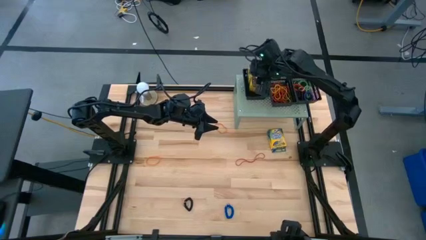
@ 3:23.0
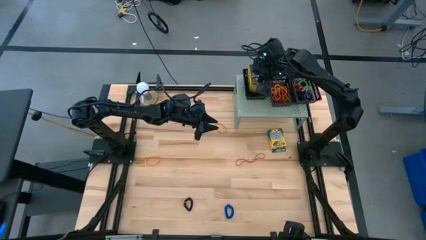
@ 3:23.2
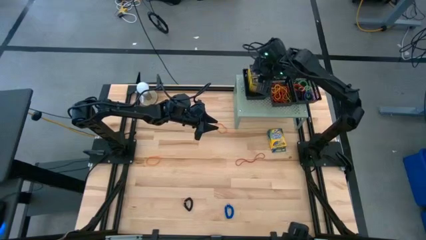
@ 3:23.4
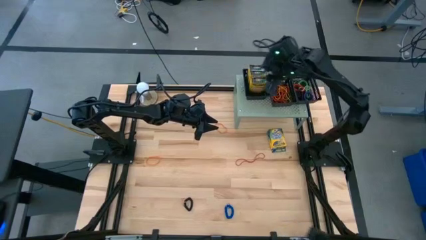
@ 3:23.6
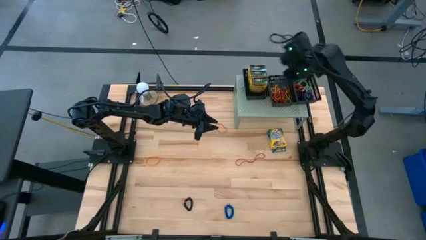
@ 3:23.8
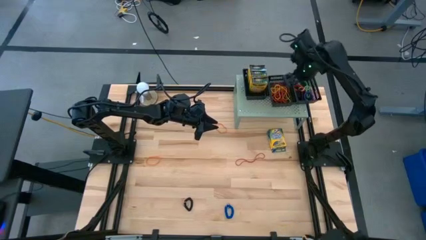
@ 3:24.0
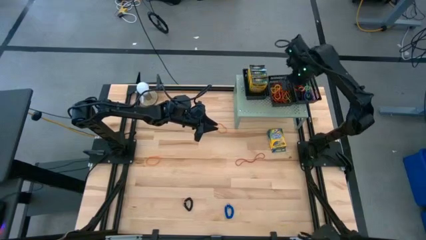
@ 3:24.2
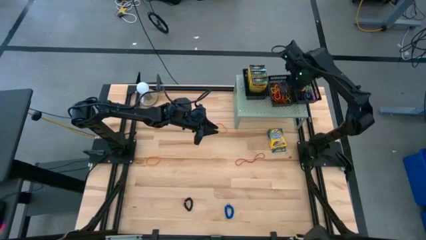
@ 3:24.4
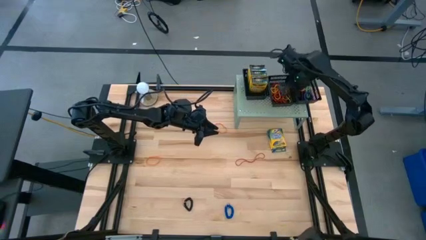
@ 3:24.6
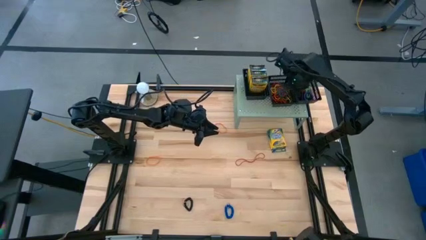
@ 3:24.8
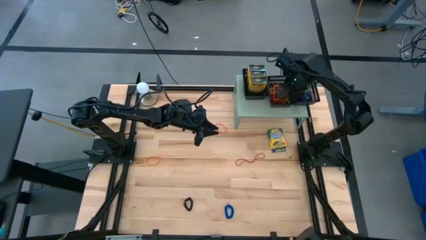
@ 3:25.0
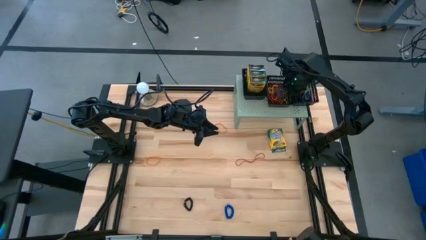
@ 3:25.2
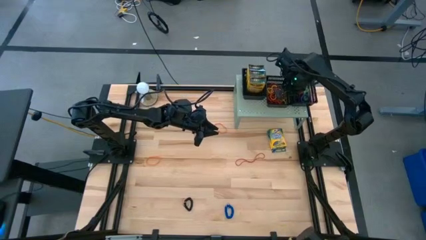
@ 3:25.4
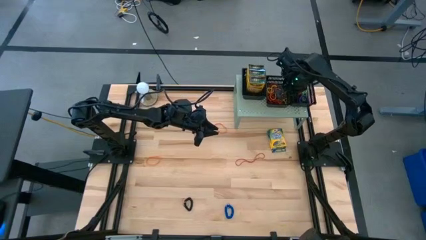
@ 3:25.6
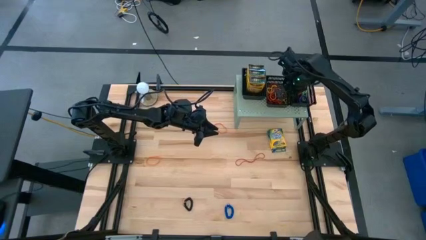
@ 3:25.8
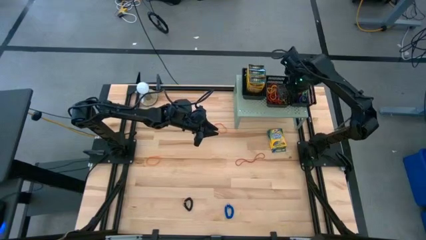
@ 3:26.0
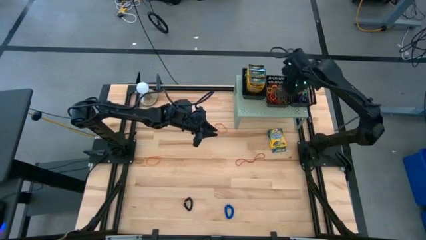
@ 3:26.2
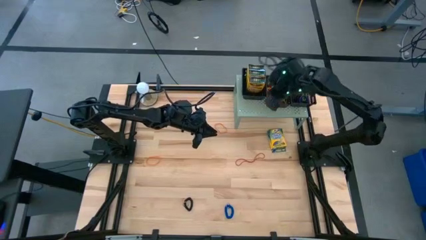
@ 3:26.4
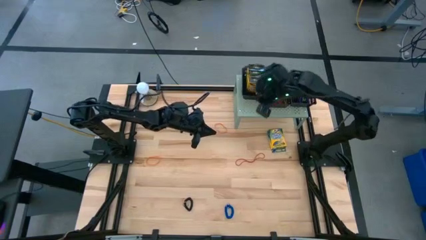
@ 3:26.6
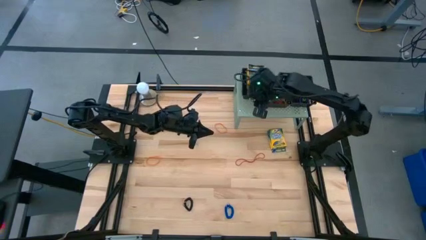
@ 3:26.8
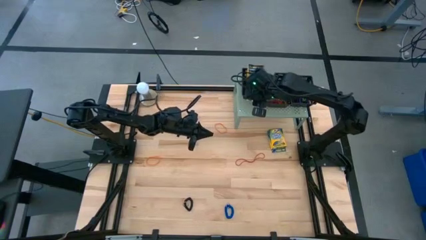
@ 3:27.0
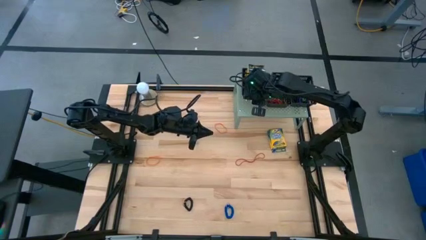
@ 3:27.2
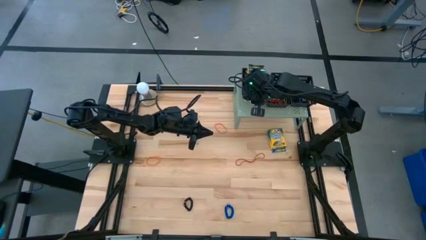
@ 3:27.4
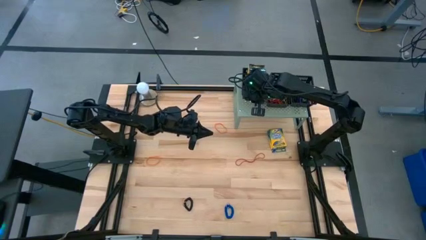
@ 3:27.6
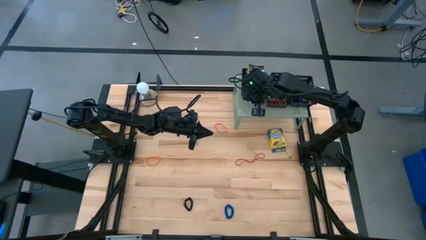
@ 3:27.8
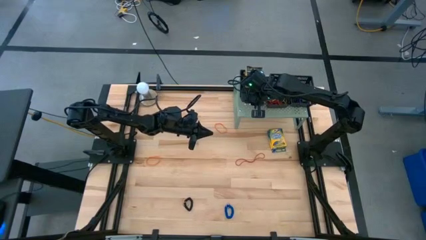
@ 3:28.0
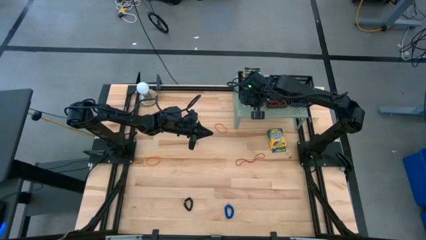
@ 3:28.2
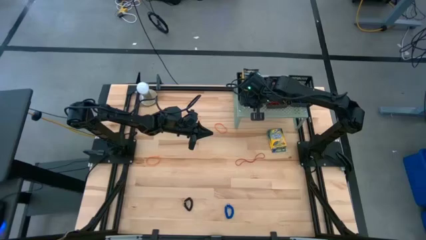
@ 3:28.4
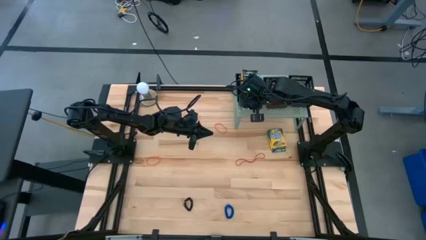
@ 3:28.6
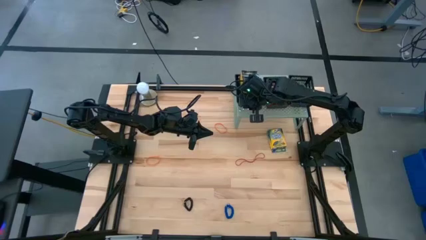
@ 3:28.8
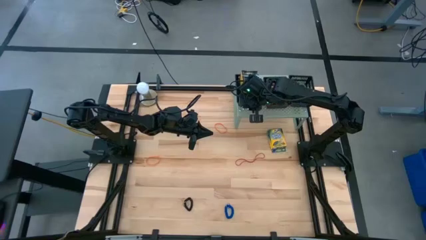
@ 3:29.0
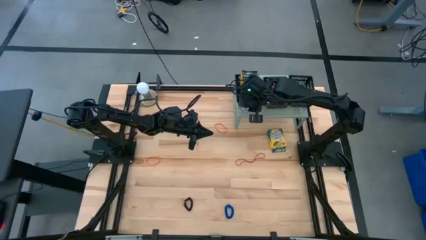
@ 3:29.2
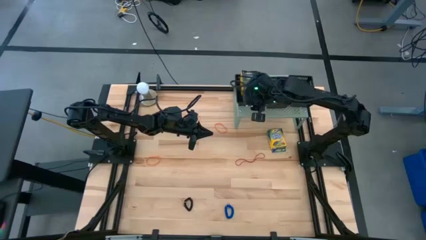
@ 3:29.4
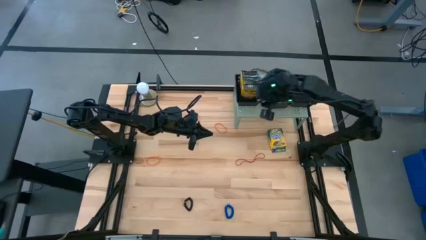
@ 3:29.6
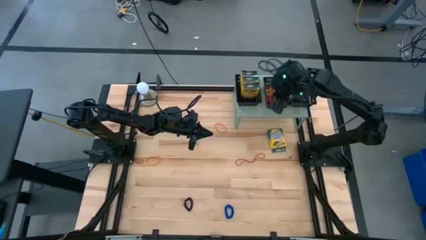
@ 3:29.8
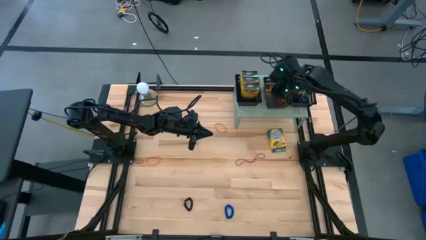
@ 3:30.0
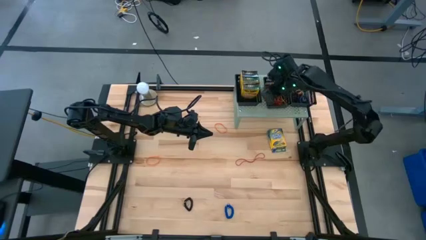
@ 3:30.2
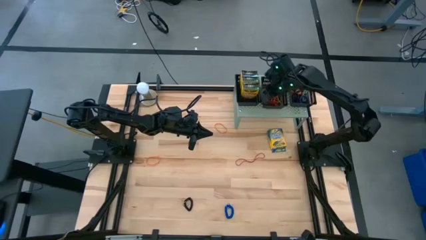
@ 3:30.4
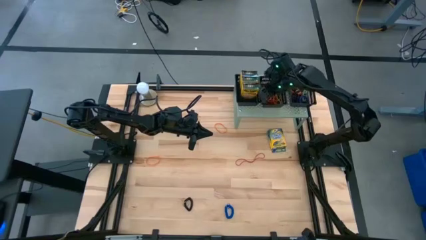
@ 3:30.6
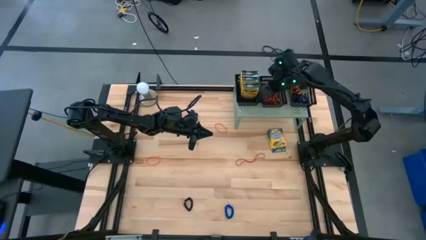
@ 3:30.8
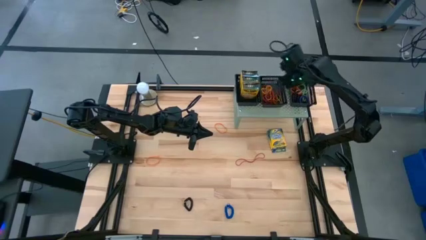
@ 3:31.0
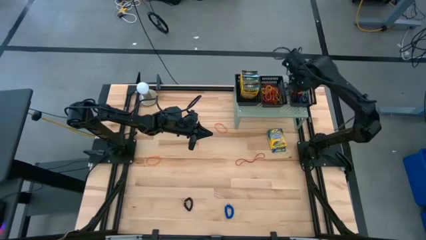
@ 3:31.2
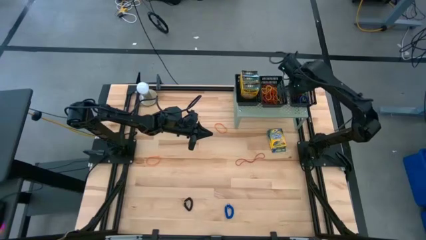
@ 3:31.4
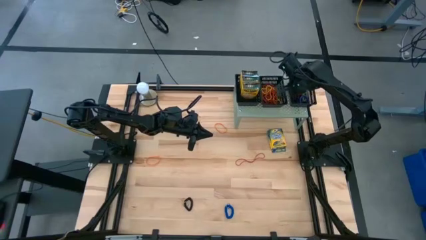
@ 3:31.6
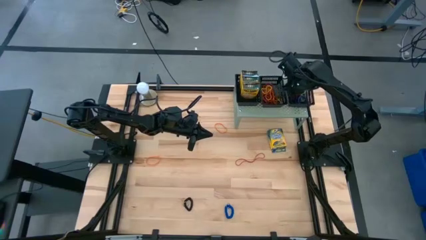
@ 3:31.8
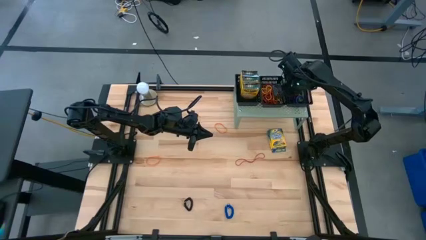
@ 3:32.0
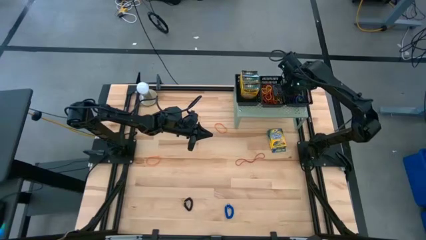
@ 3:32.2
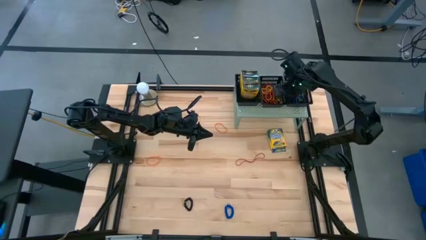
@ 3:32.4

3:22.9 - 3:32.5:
Task: Pick & Place Office Desk Supplies
Adjust the black baskets on the shelf

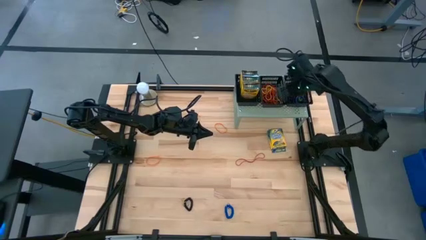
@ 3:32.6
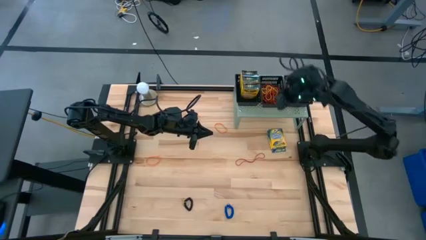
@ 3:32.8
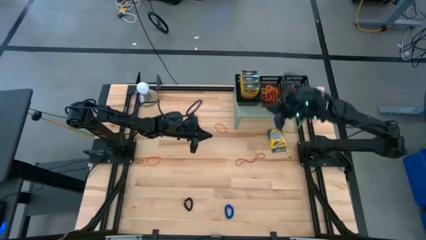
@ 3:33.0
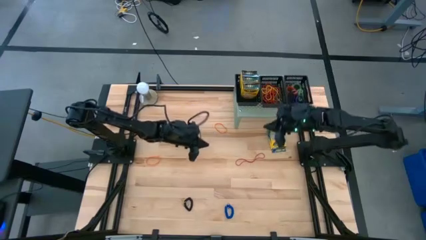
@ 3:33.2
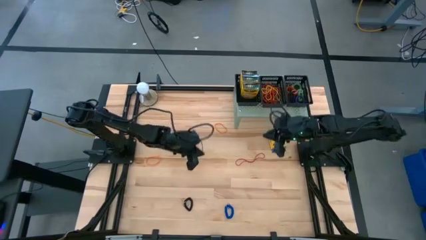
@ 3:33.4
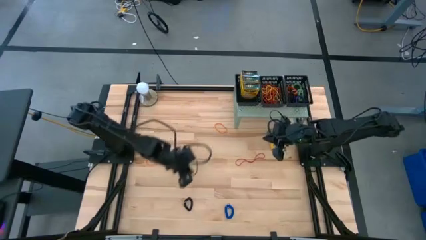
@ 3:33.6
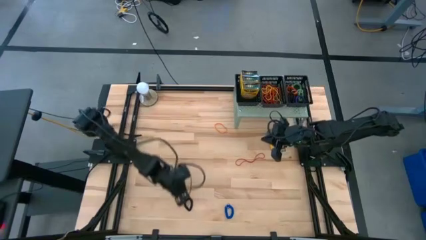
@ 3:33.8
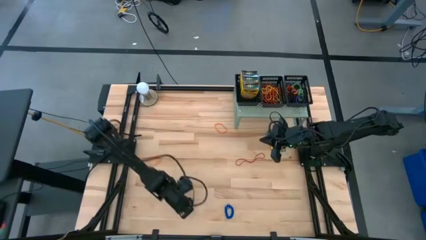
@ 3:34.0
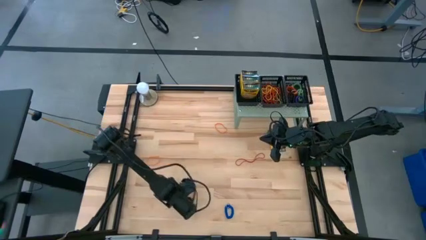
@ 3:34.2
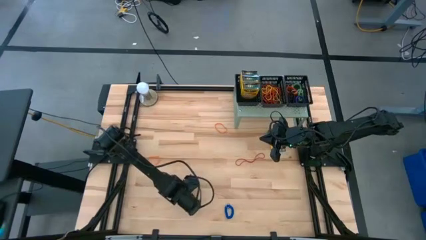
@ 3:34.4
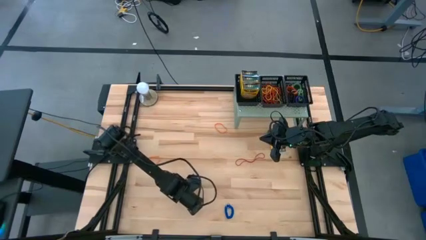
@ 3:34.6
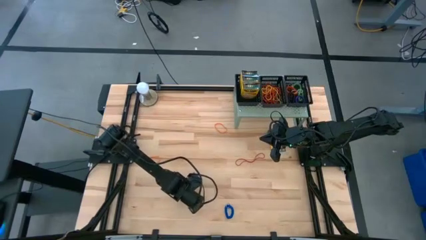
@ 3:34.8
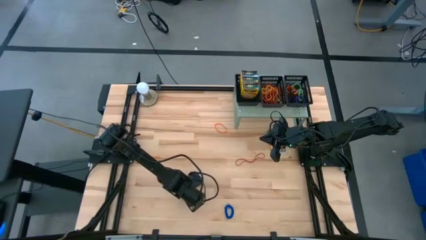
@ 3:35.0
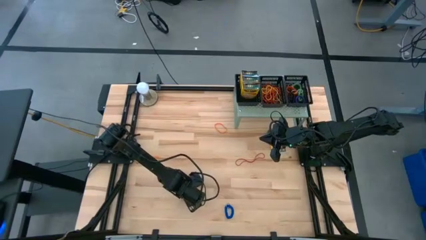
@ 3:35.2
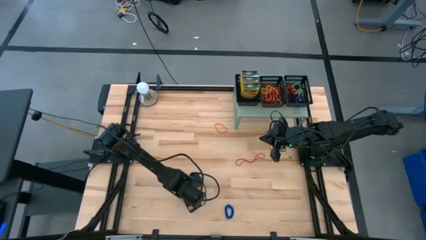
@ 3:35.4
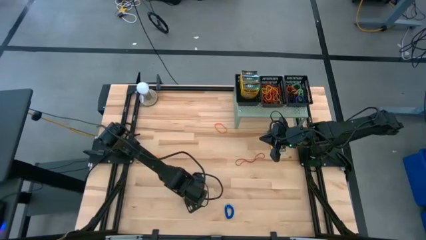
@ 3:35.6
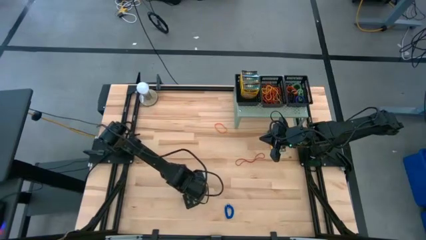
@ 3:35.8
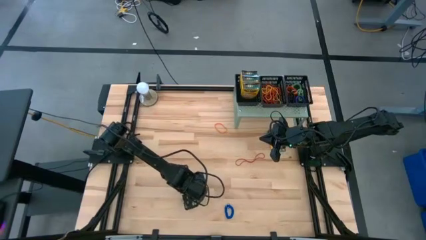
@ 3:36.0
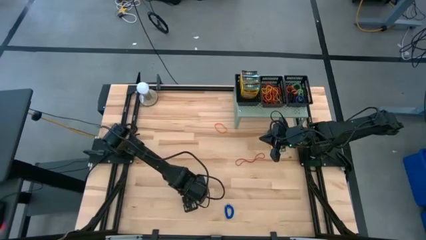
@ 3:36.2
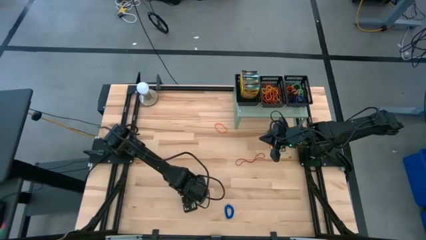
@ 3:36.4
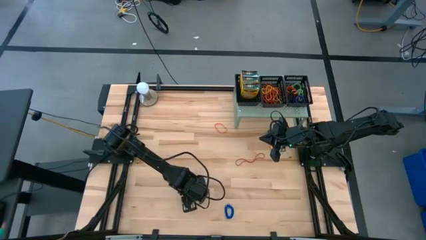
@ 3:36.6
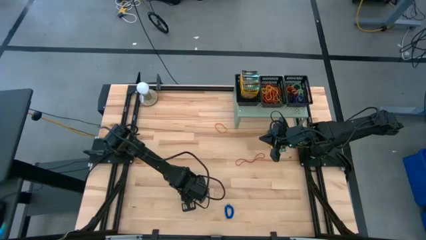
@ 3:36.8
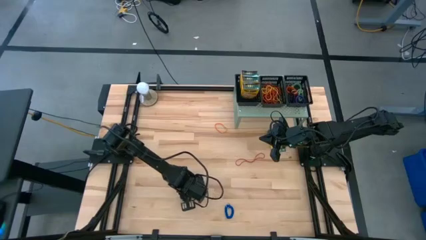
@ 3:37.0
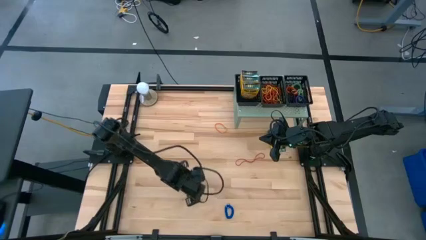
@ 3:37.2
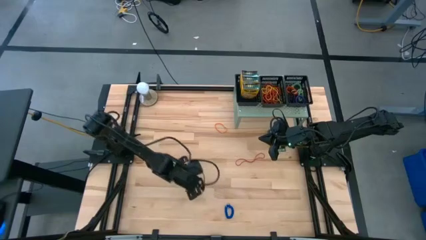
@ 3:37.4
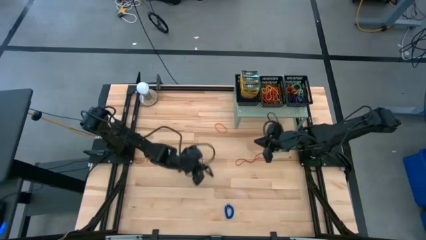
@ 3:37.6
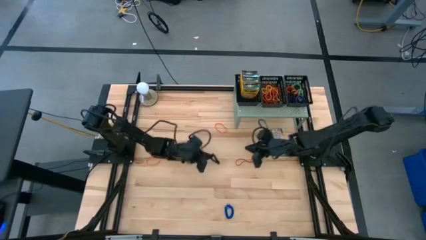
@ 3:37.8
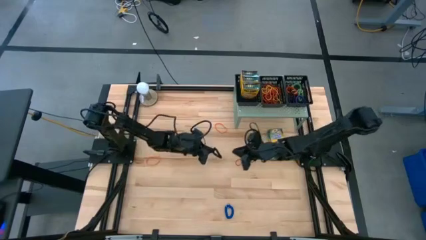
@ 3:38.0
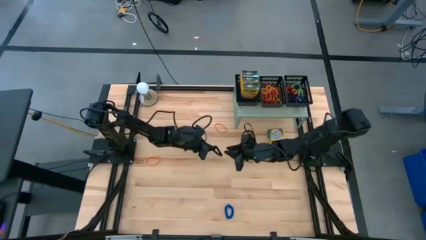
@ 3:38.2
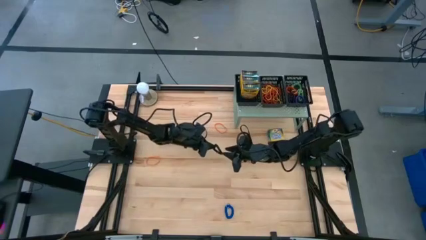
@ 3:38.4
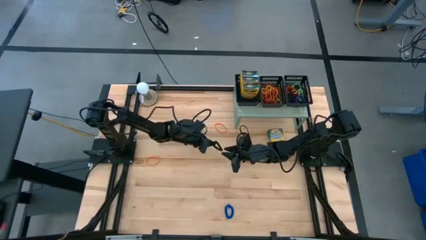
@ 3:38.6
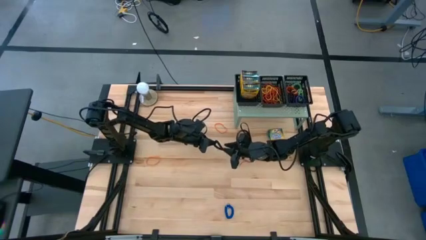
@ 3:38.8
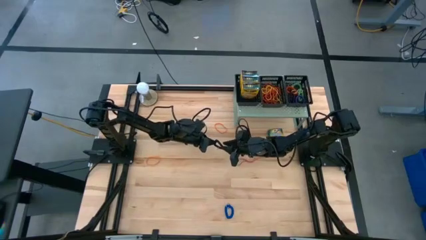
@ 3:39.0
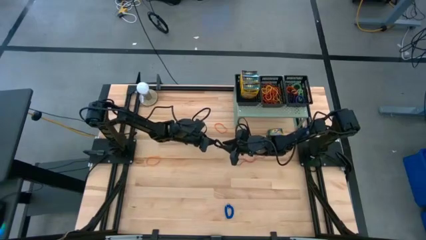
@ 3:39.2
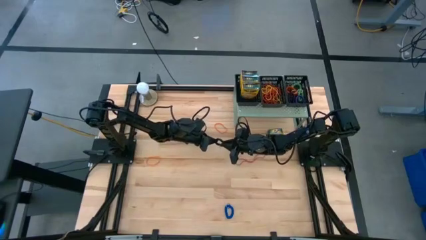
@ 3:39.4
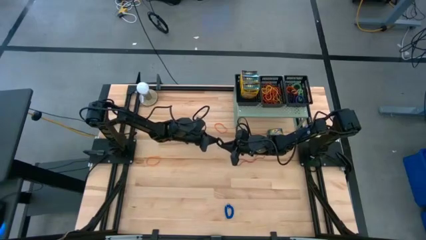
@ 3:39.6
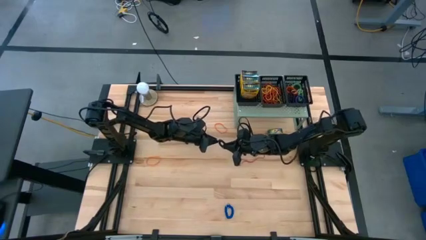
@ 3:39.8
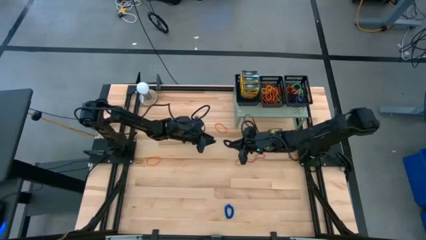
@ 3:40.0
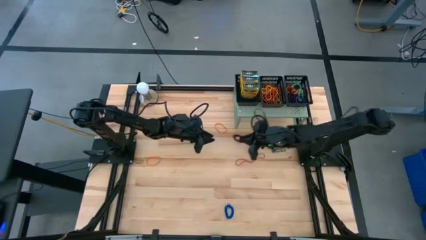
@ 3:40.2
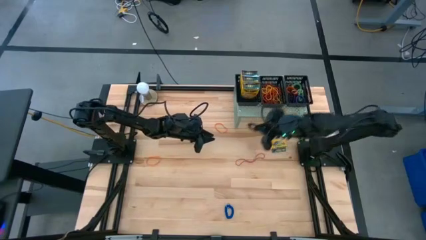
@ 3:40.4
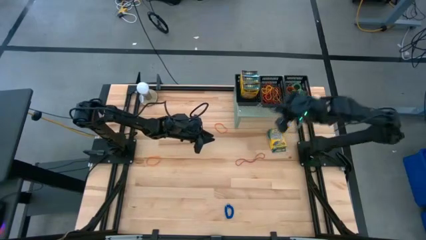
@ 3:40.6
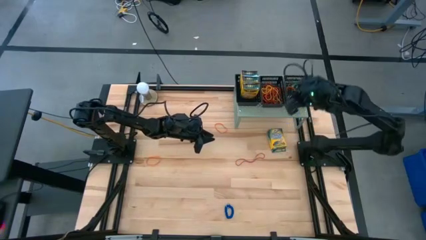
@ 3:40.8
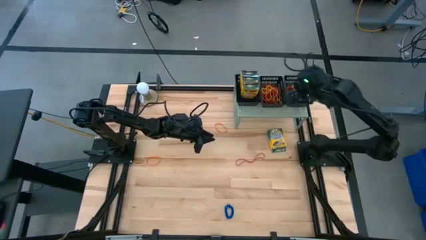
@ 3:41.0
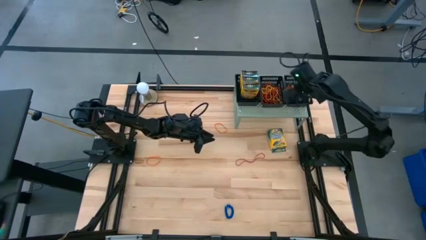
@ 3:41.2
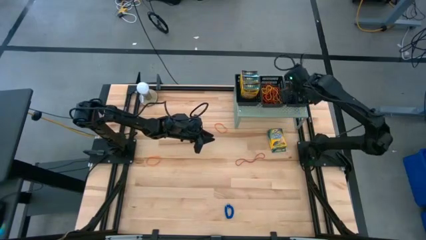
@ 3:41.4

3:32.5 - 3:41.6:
Put the black spring keychain into the right black basket on the shelf
